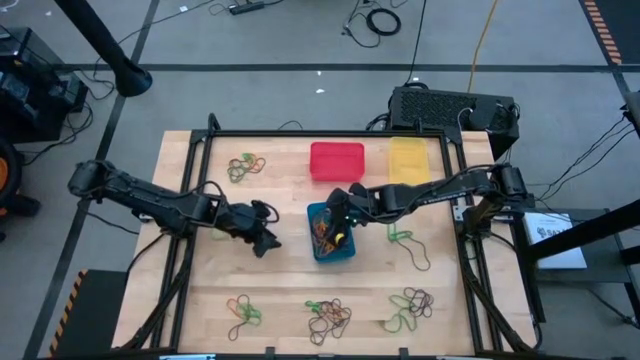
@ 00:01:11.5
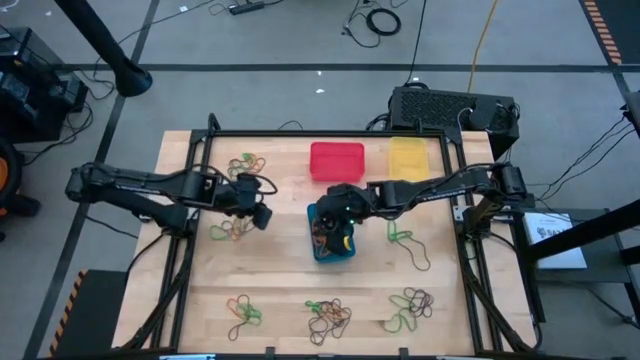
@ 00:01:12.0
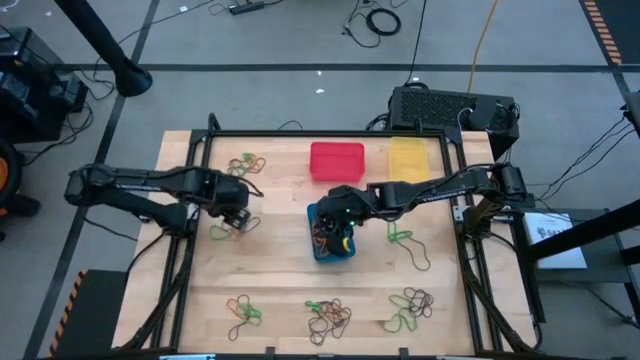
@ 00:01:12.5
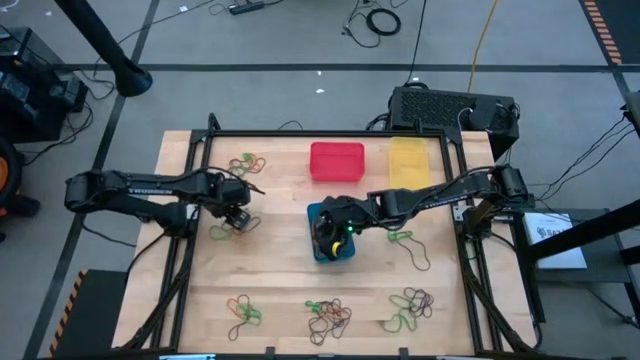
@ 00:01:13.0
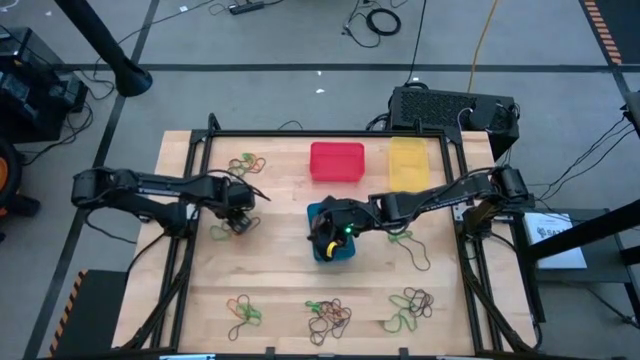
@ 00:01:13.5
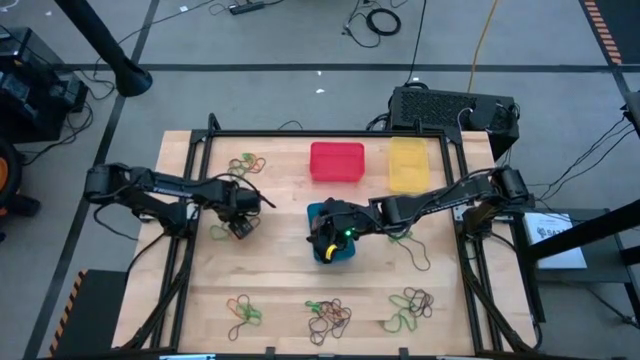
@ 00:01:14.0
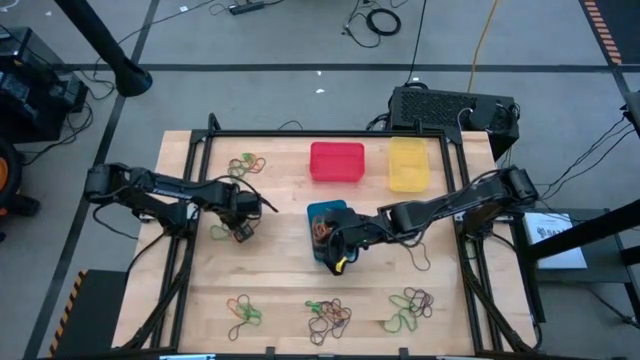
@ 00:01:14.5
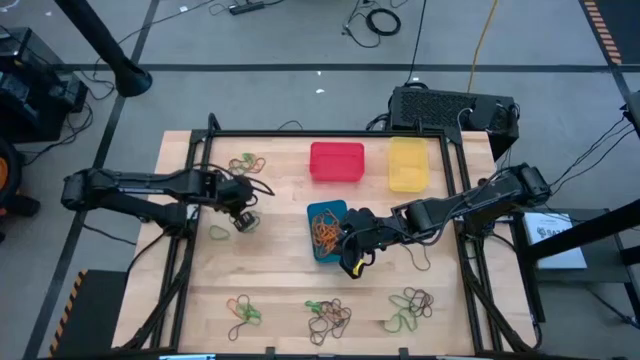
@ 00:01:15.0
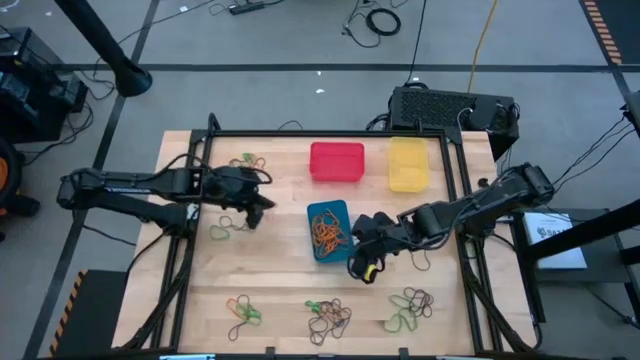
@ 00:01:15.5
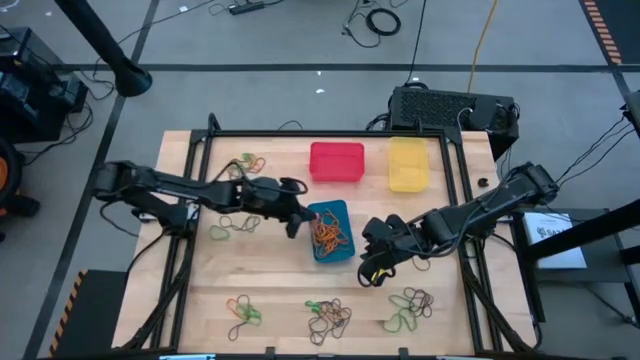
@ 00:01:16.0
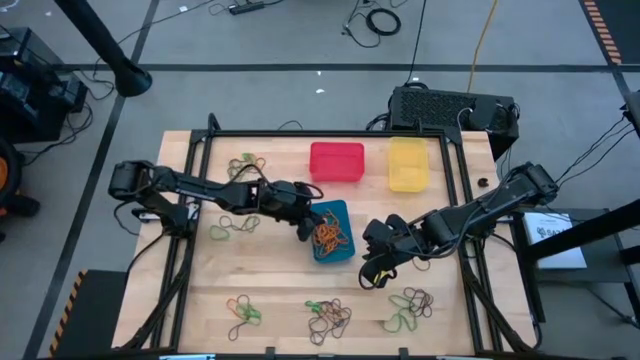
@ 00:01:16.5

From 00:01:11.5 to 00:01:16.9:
Task: Sort rubber bands into baskets
Put the orange rubber band into the blue bin

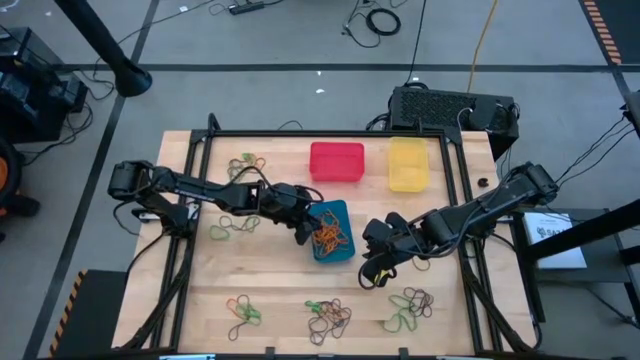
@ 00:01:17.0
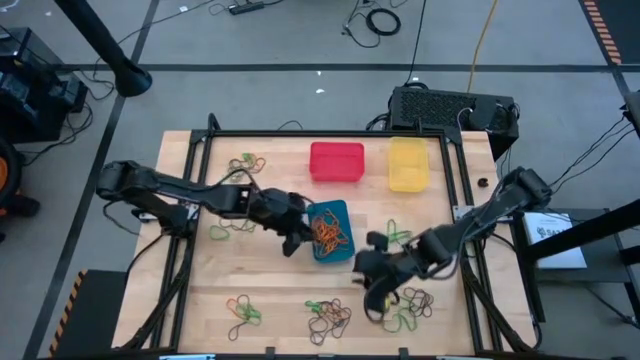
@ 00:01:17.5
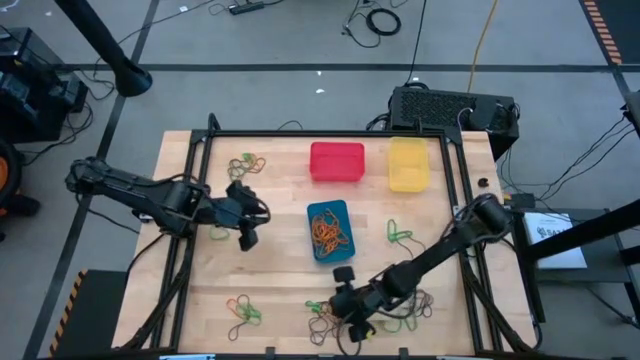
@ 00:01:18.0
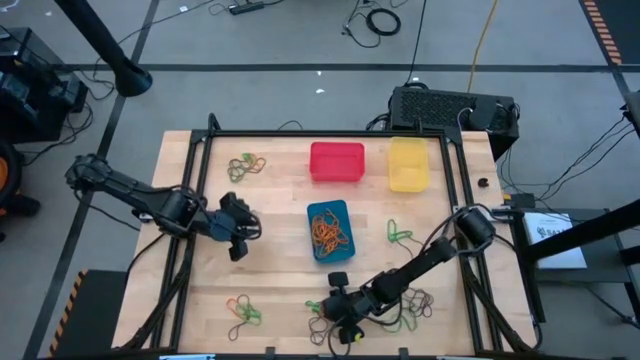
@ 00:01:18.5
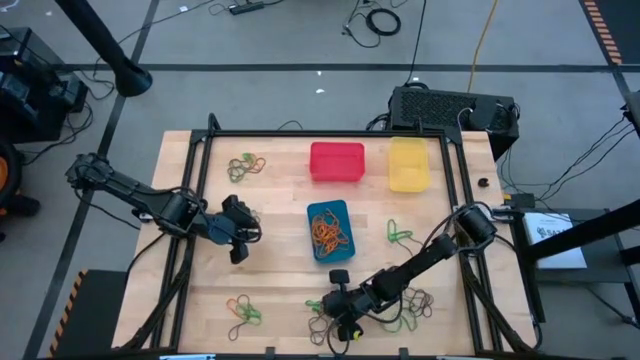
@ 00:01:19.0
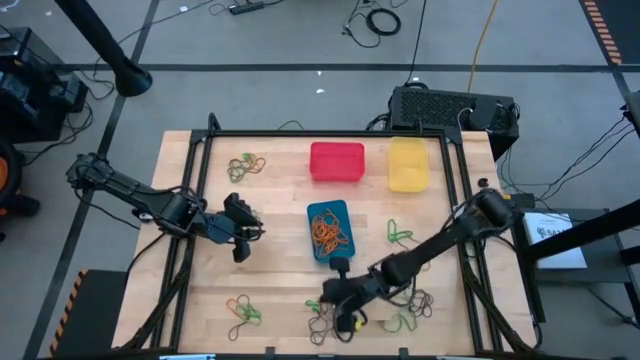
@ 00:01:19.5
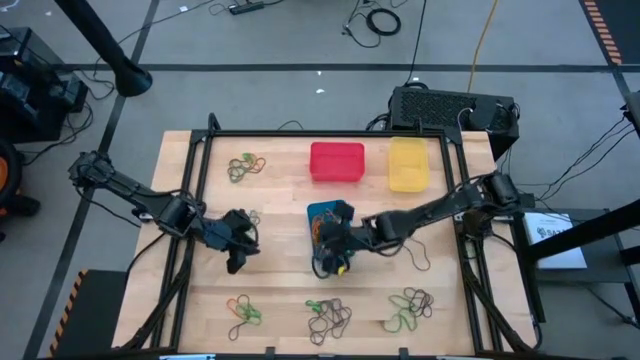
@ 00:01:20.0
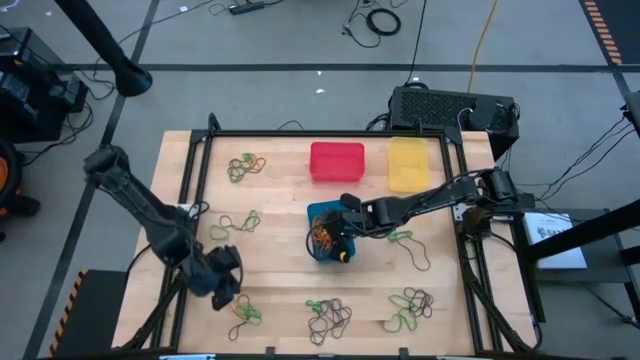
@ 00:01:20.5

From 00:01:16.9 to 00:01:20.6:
Put the orange rubber band into the blue bin

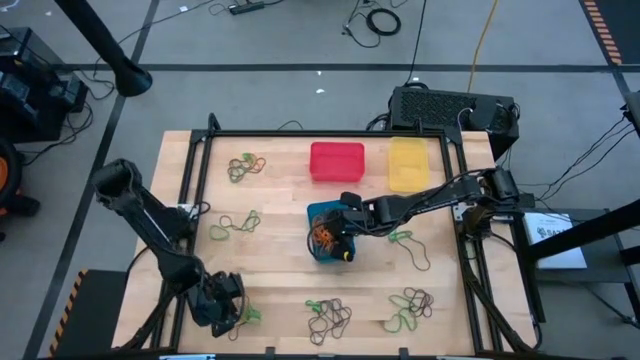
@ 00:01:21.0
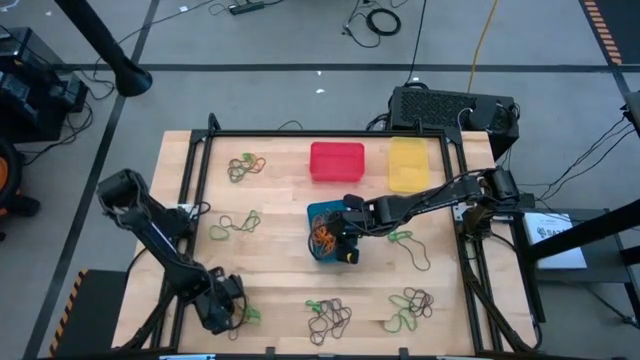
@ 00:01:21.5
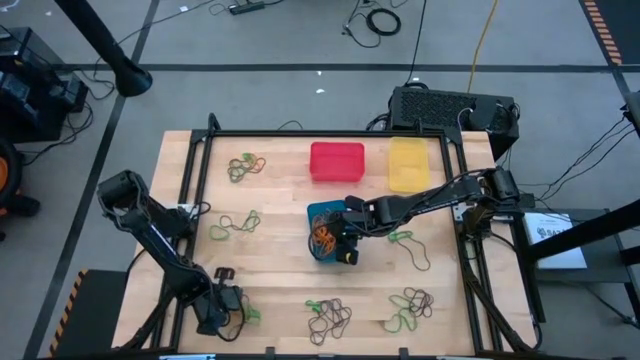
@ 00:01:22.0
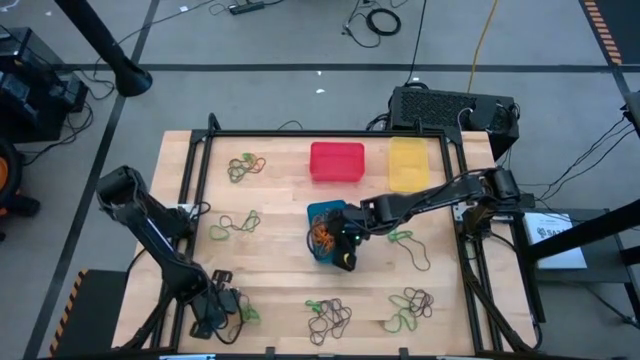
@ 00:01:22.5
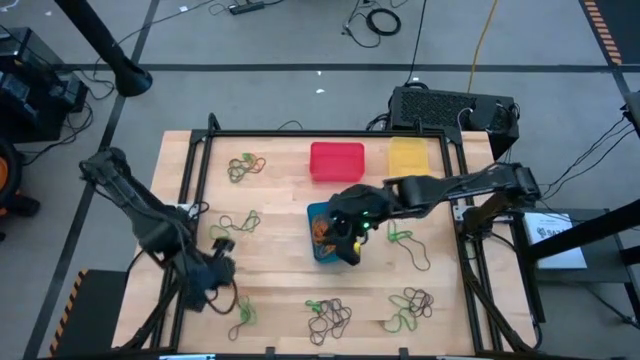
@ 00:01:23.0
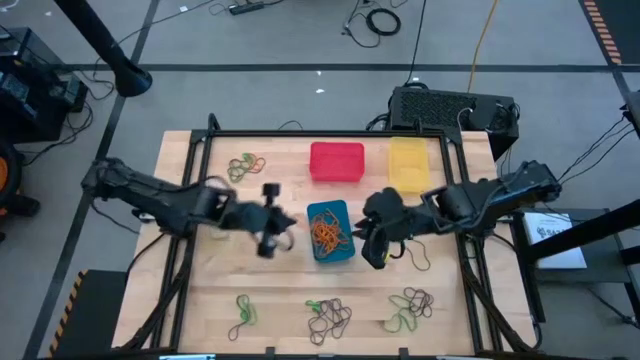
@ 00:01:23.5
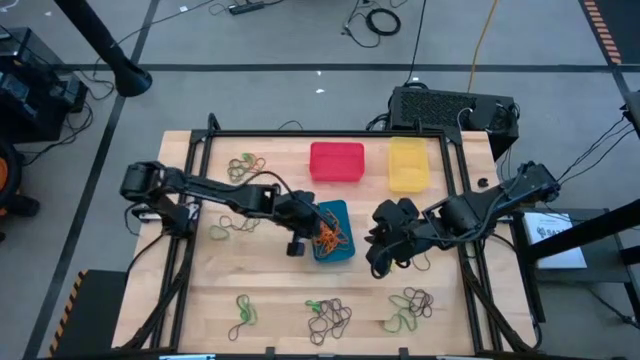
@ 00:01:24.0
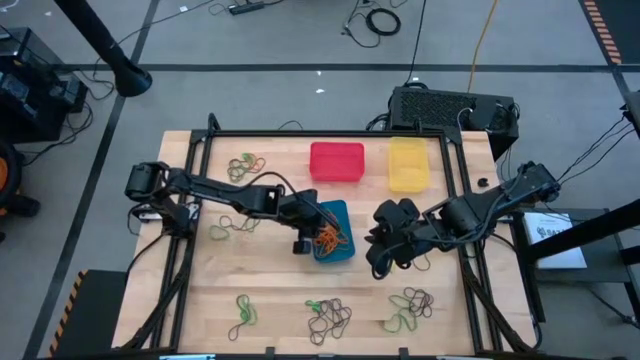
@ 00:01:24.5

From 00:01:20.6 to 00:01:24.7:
Put the orange rubber band into the blue bin

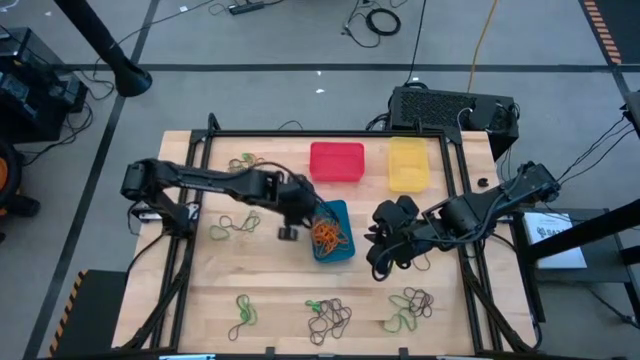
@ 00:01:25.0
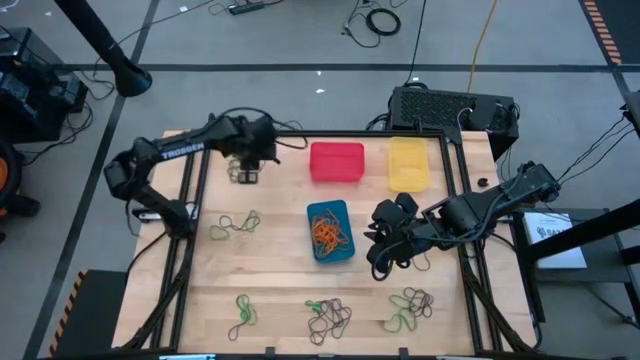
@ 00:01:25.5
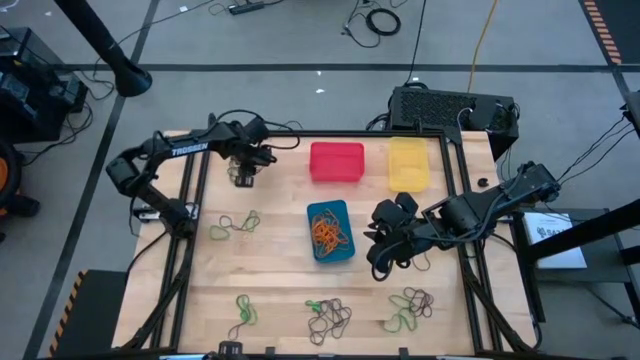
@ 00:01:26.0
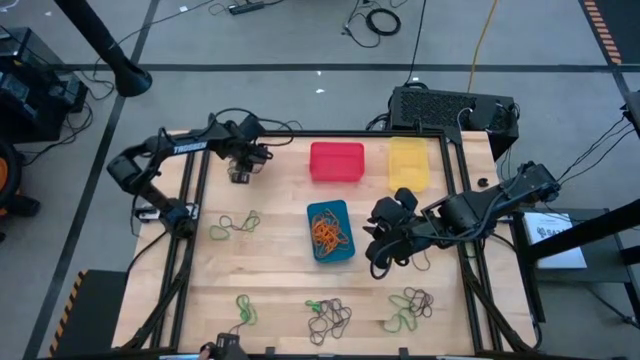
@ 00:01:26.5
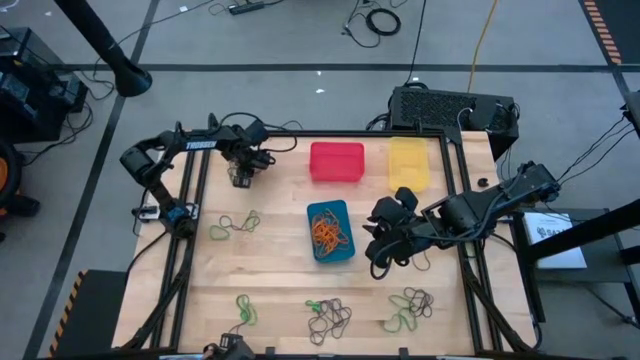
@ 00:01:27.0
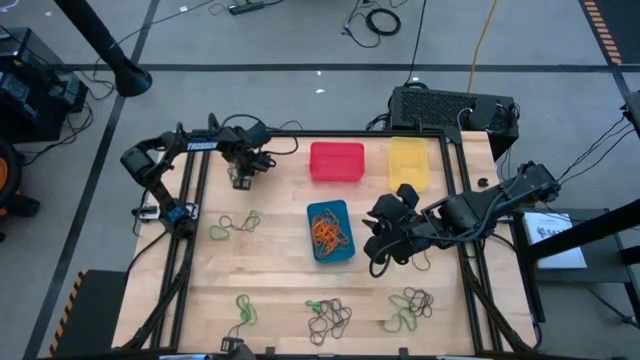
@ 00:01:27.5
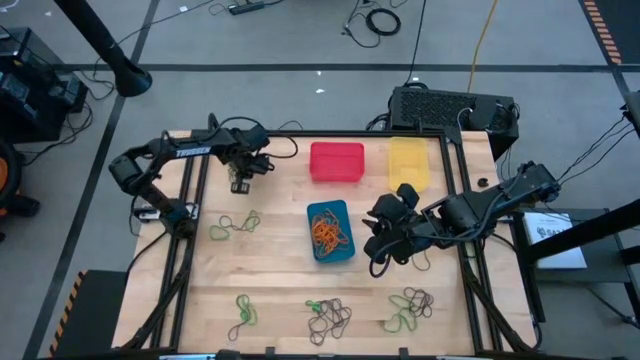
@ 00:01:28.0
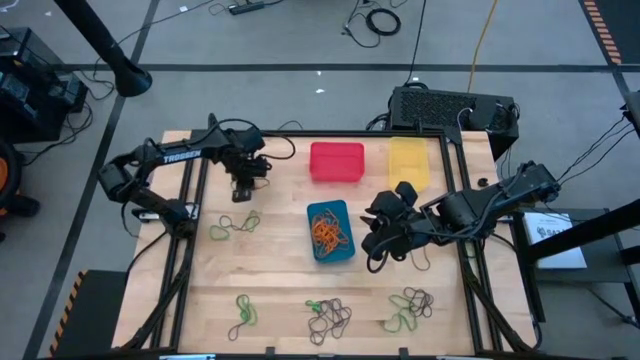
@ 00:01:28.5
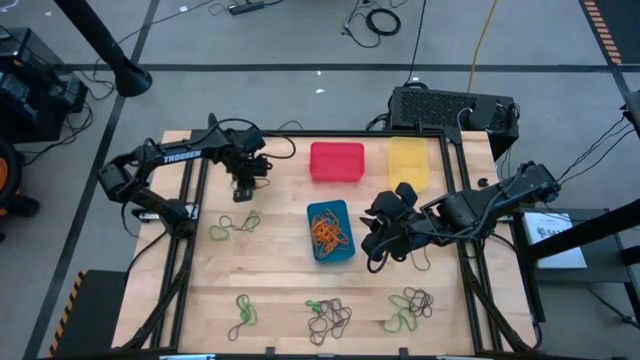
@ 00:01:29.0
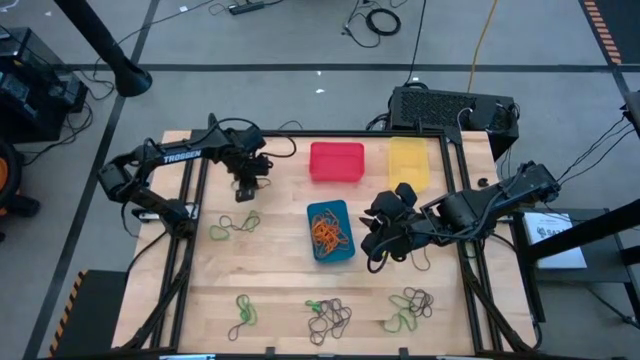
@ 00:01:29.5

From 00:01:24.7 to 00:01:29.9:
Put the orange rubber band into the blue bin

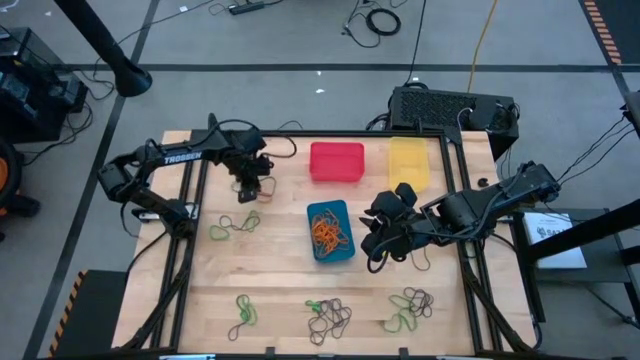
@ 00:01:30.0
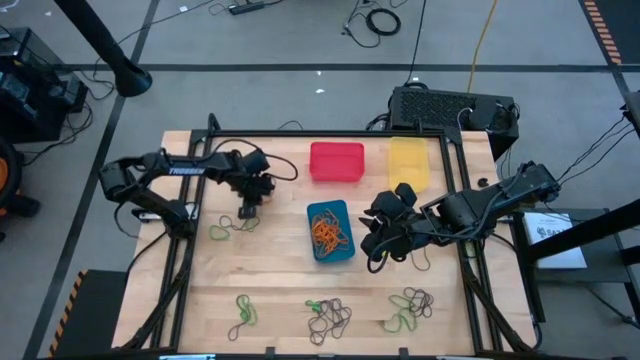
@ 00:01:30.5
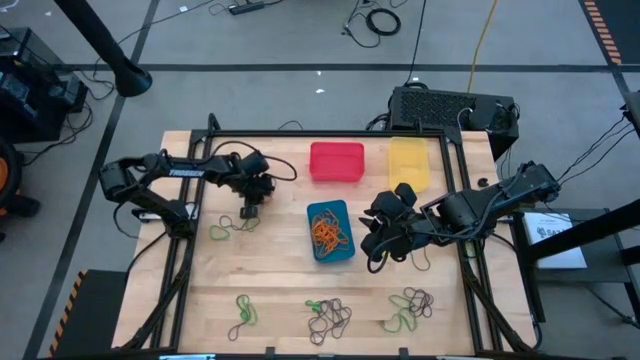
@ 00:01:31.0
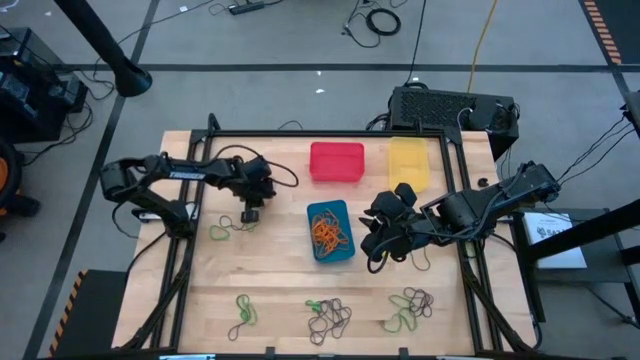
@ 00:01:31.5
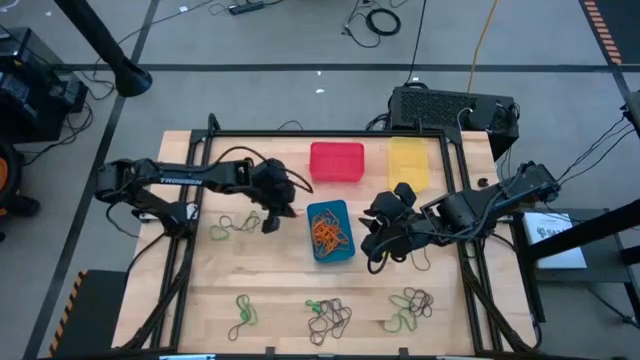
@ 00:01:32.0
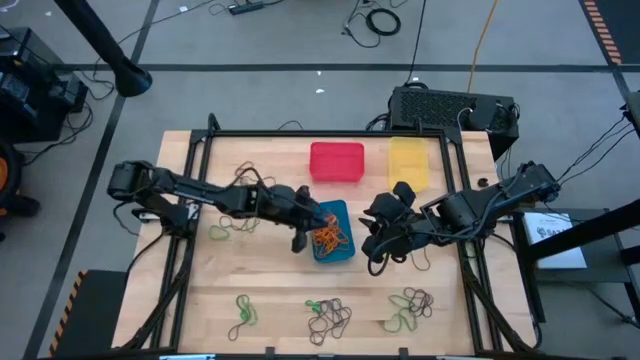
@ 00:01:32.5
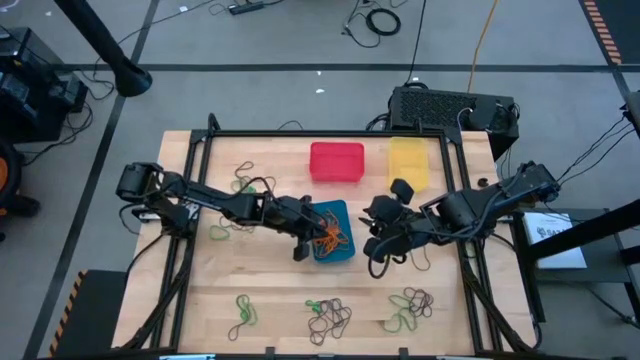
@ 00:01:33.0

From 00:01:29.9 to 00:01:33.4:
Put the orange rubber band into the blue bin
